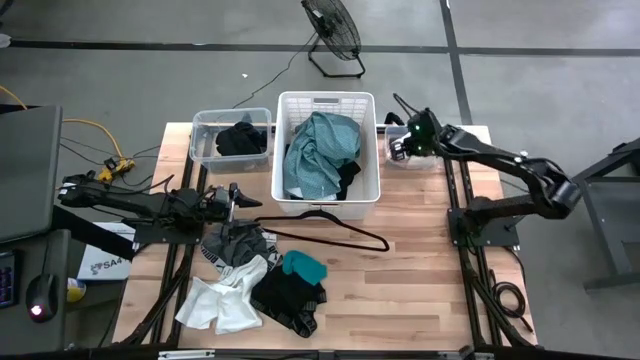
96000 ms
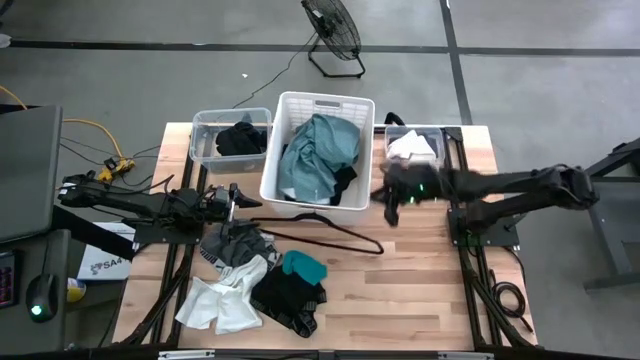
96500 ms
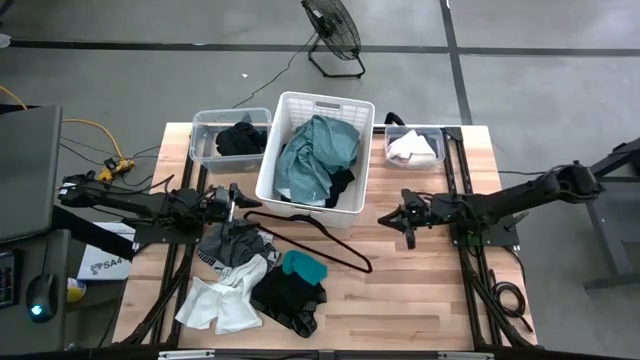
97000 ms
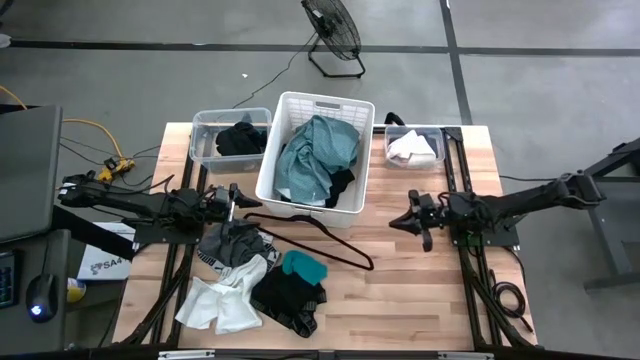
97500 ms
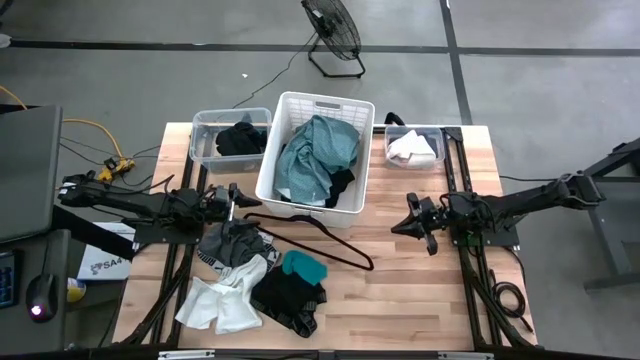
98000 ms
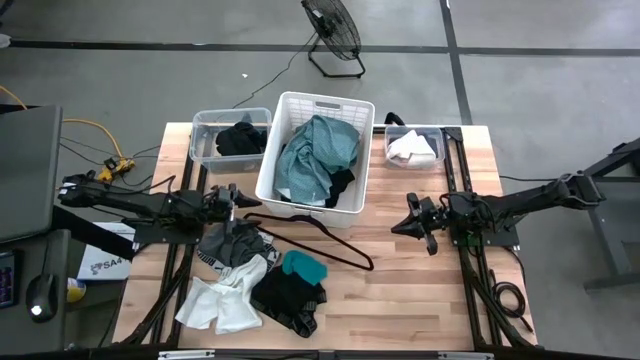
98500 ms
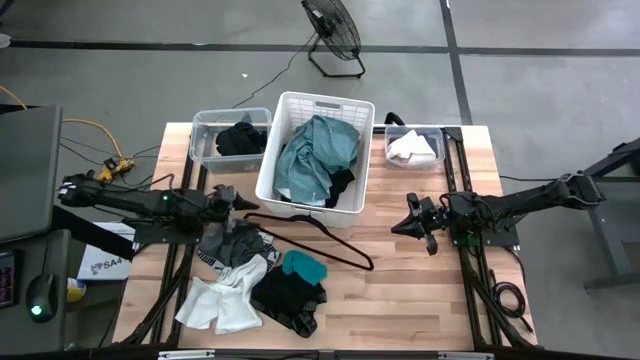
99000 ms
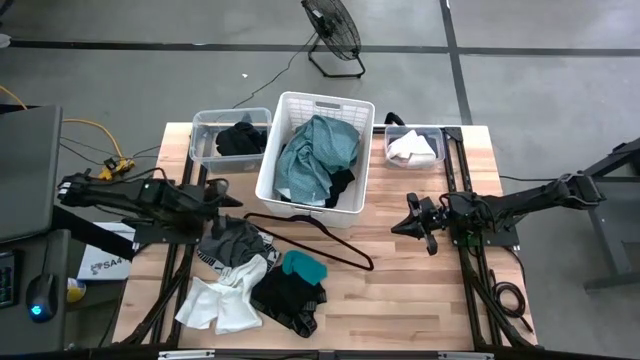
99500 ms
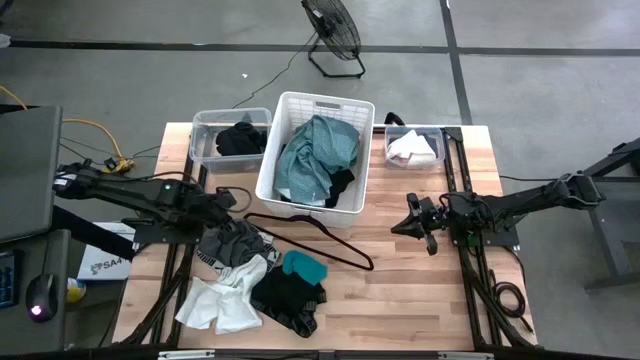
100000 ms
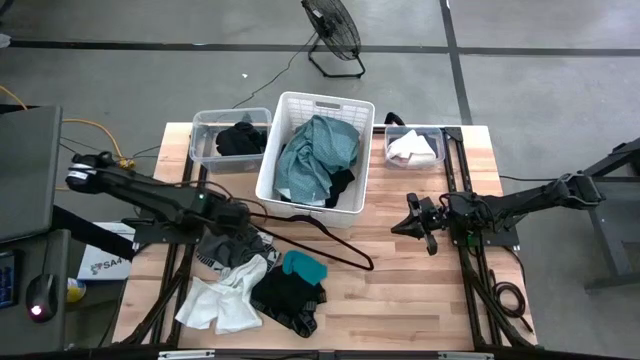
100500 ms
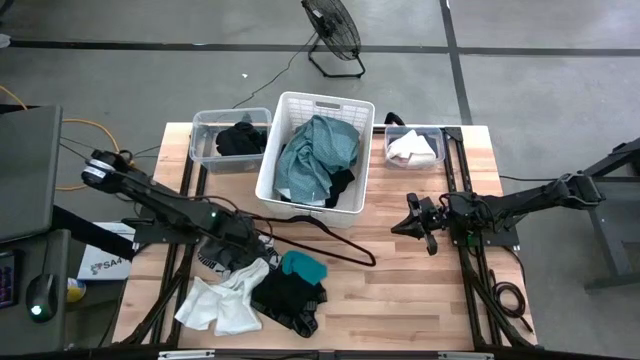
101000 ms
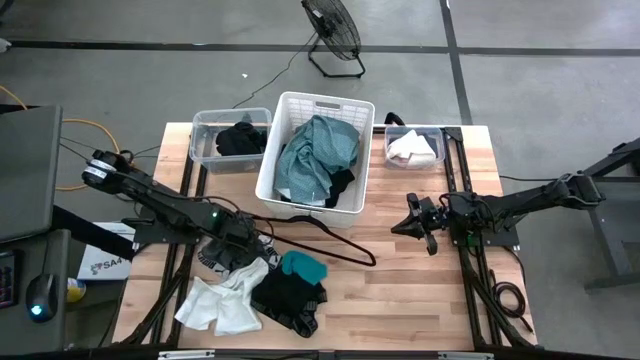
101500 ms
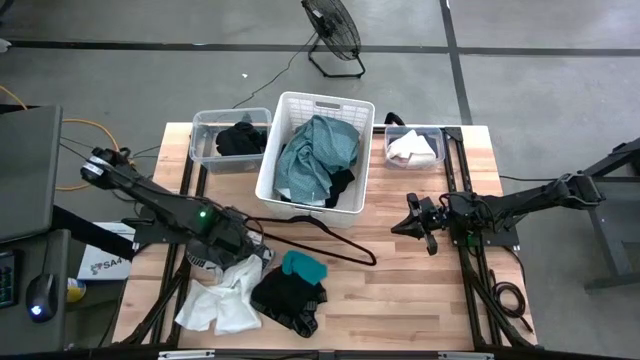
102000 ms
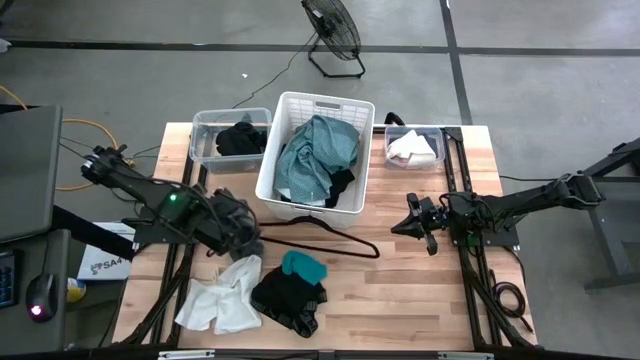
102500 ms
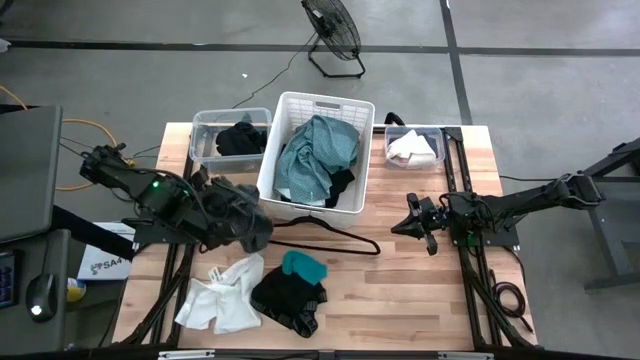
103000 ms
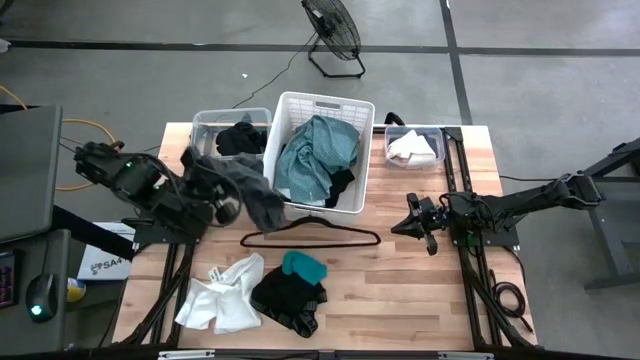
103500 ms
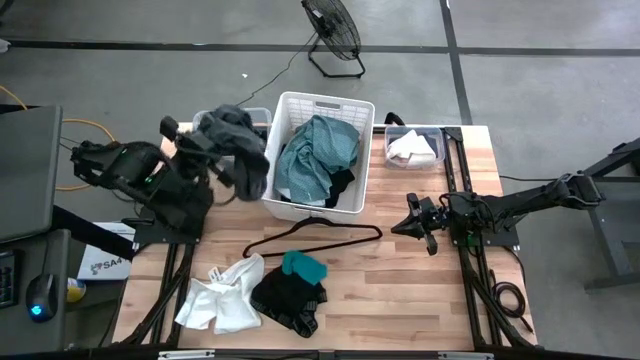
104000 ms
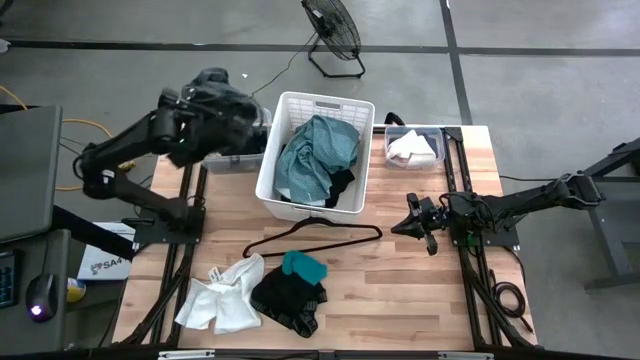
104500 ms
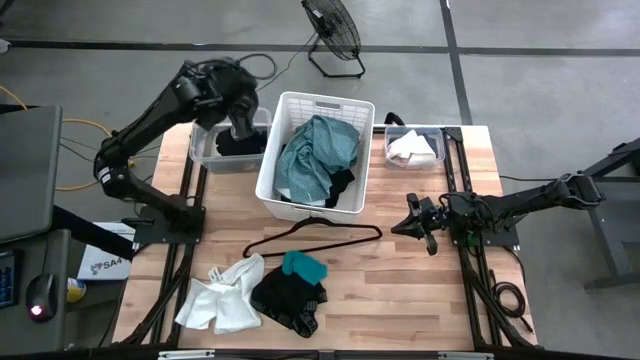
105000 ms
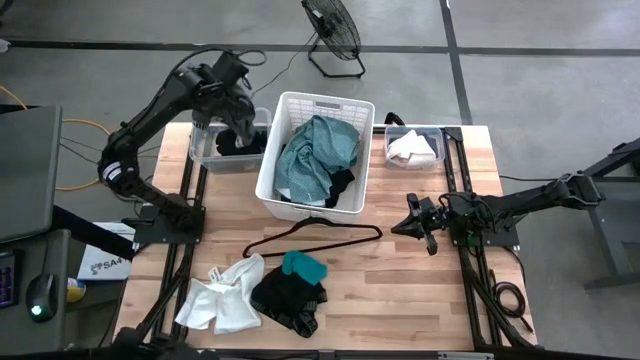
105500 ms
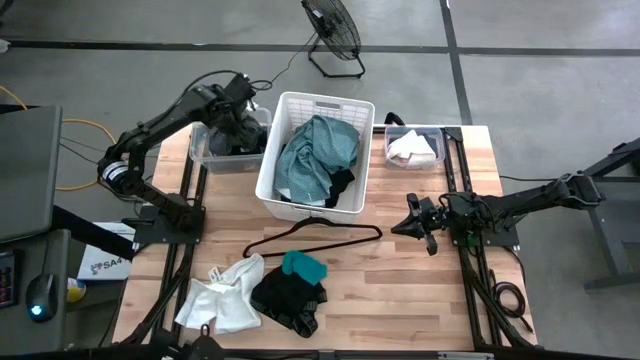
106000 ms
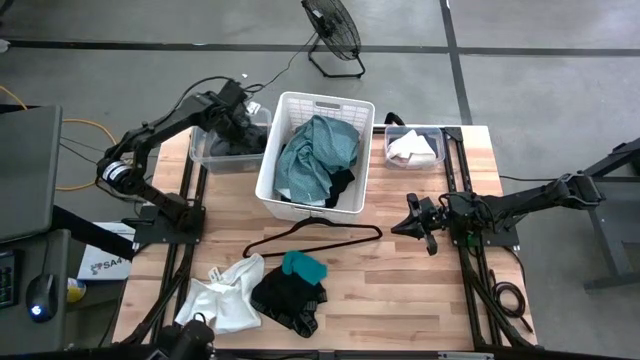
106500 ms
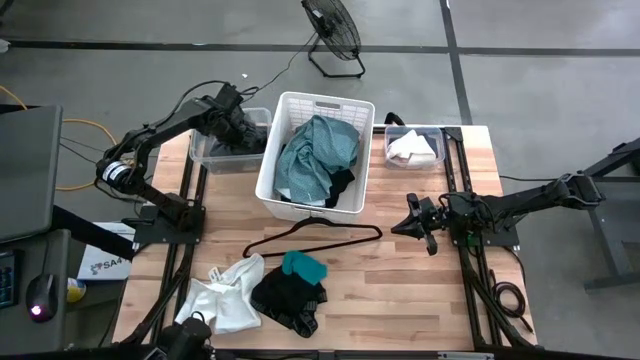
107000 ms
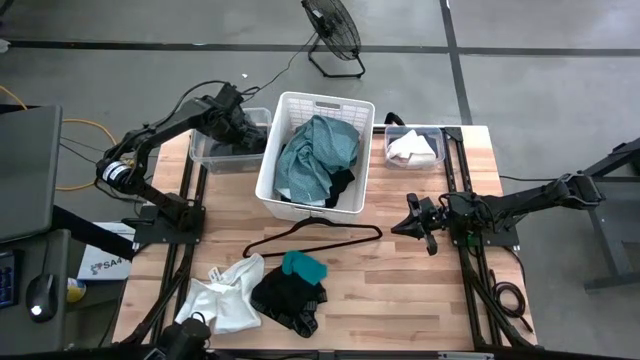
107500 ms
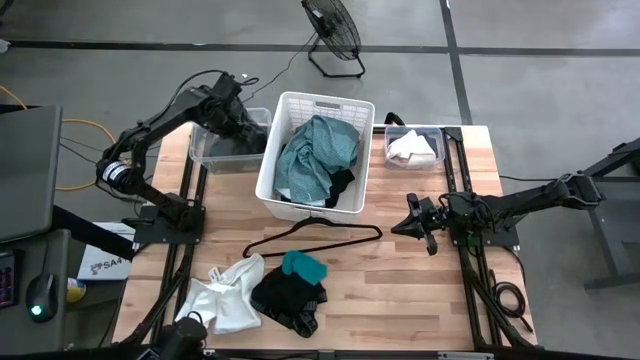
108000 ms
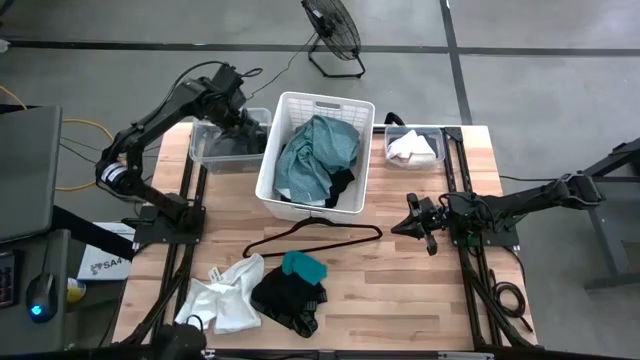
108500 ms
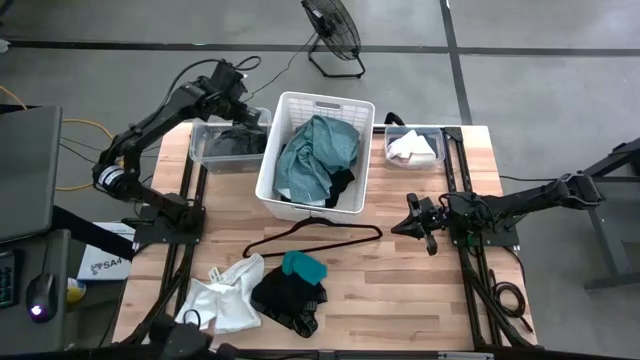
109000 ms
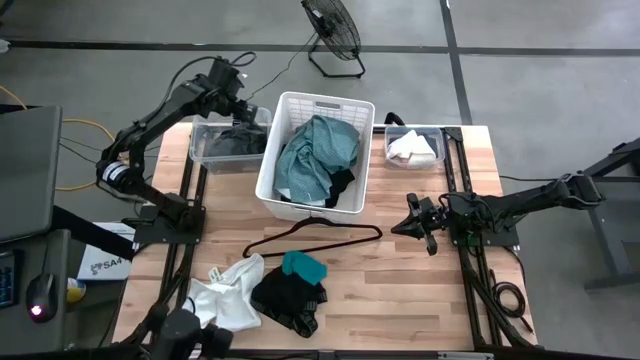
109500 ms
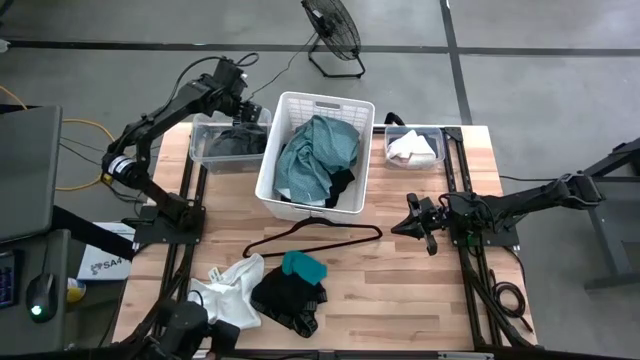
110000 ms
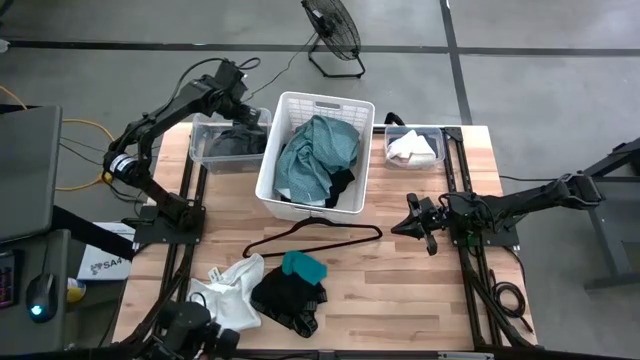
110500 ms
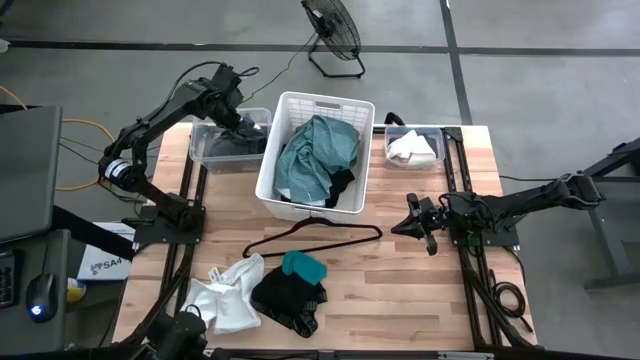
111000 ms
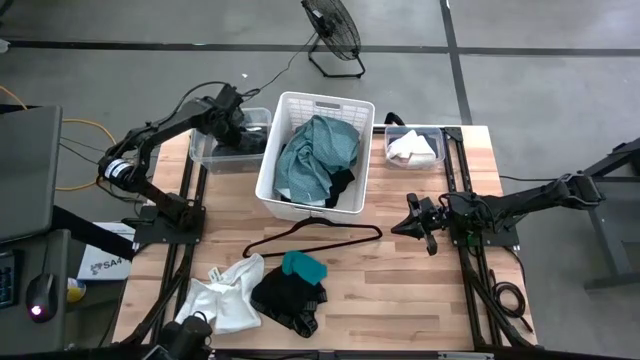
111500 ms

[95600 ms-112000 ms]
Task: Pick & Place Cloths
Put the grey boxer shorts into the left transparent bin

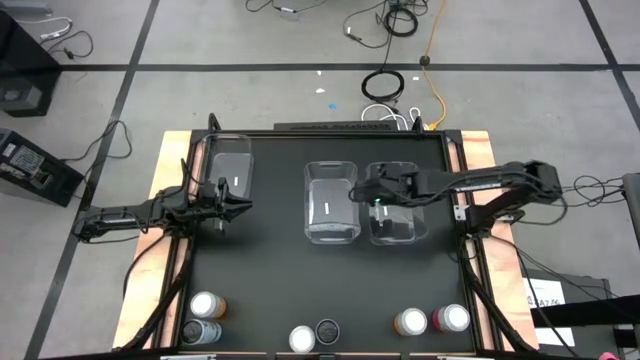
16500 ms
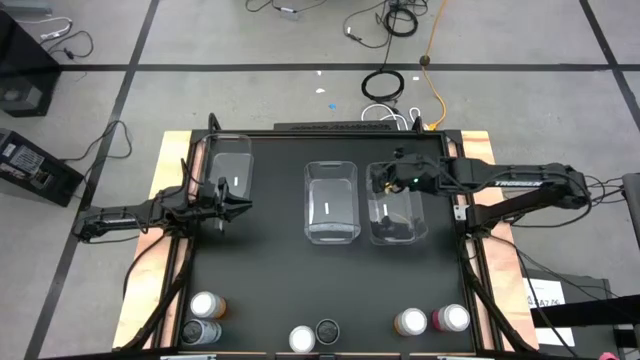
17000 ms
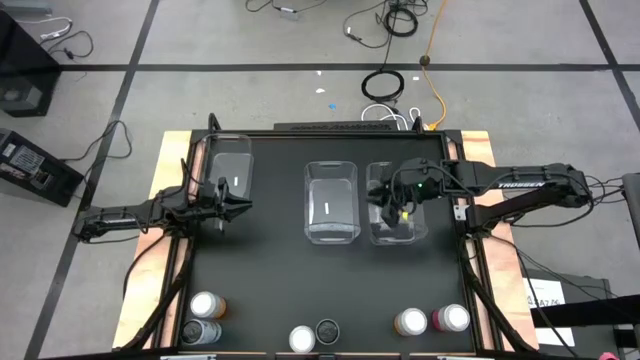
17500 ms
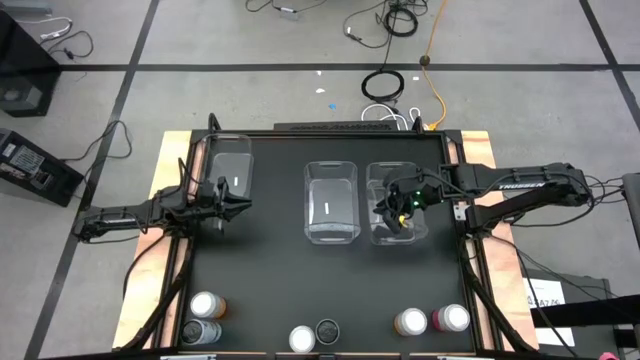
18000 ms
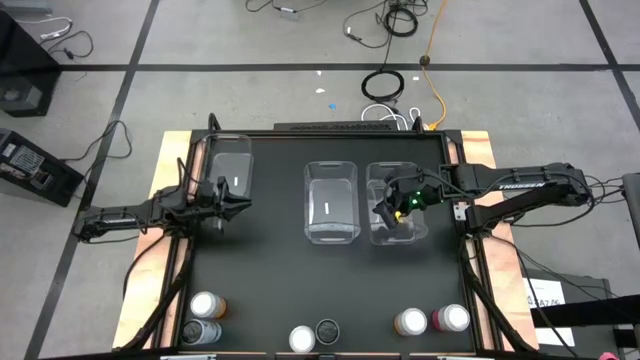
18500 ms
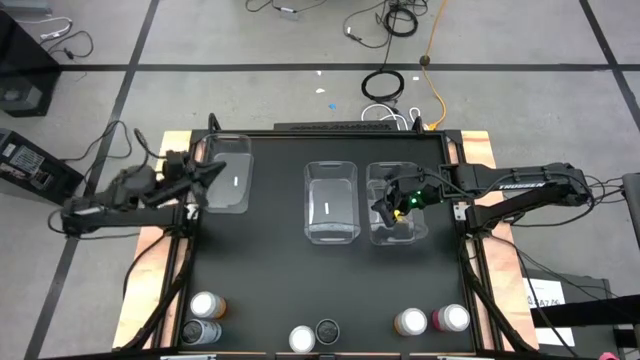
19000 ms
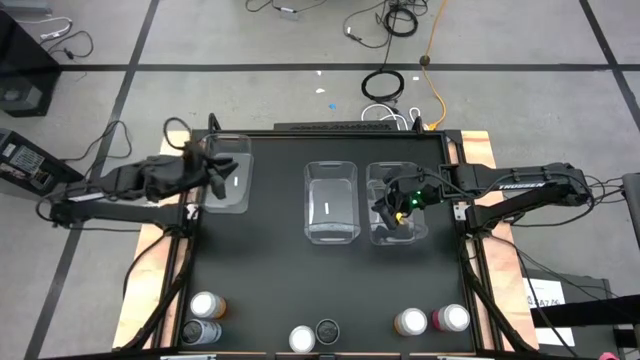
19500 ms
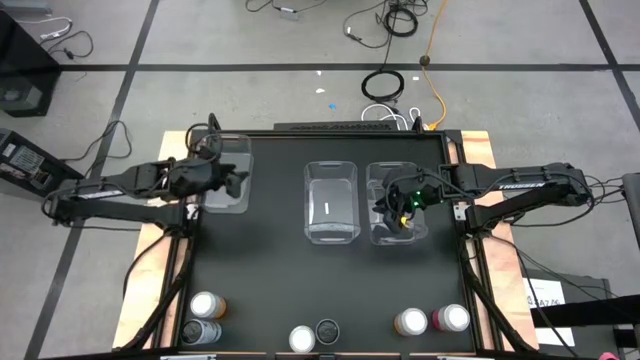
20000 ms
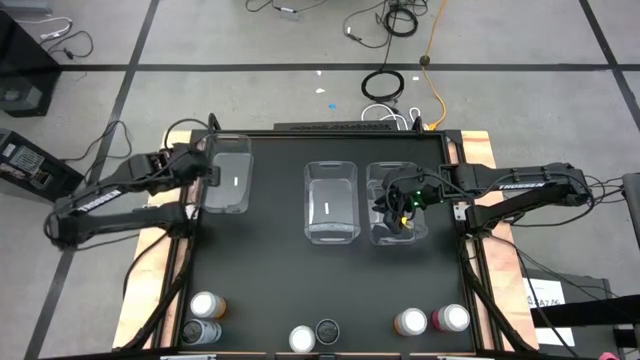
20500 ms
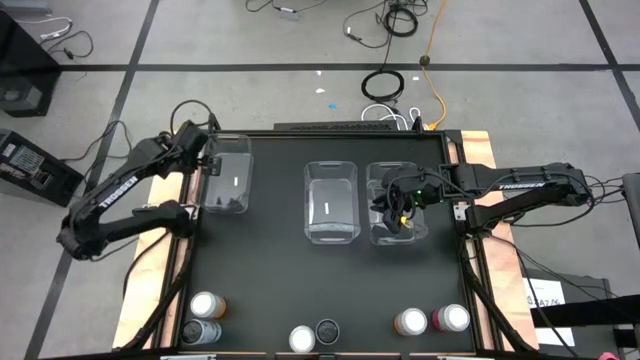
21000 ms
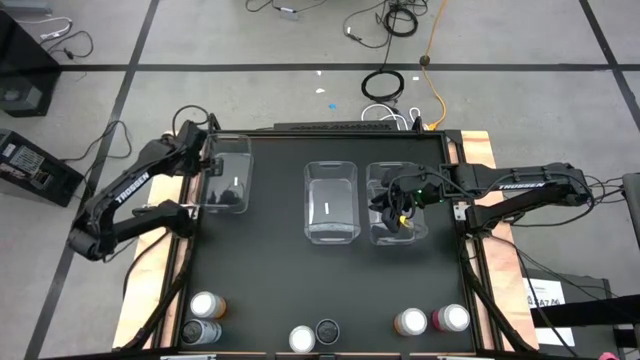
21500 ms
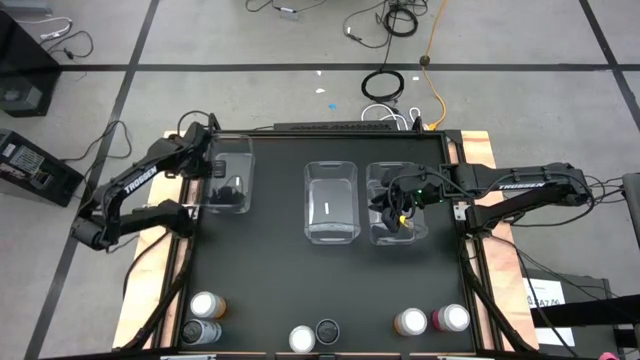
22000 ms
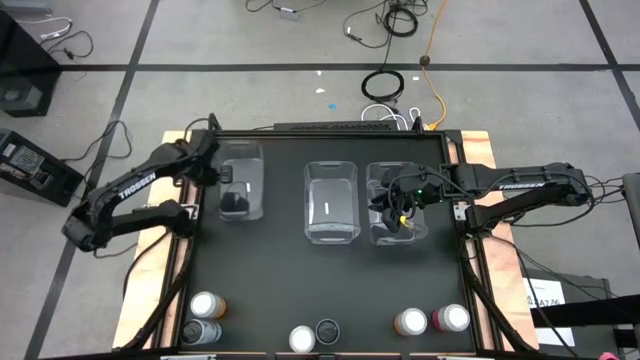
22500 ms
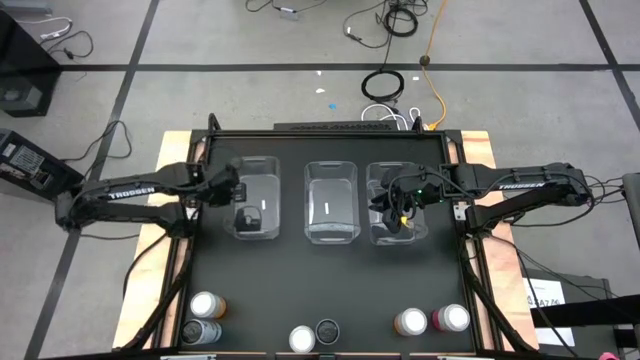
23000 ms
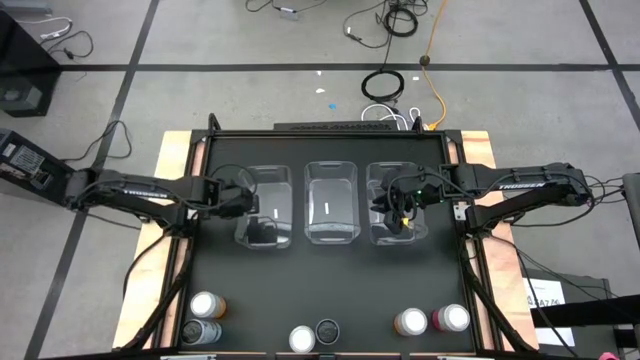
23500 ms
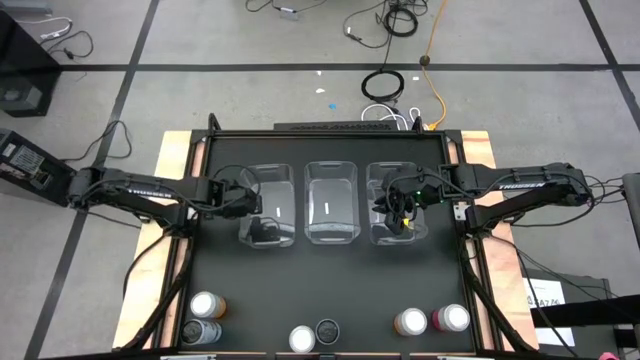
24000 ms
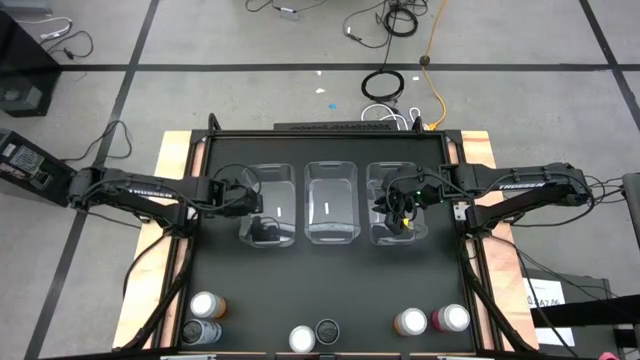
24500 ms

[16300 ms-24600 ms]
Task: Sort soda cans
Move the left transparent bin into the middle left of the table
